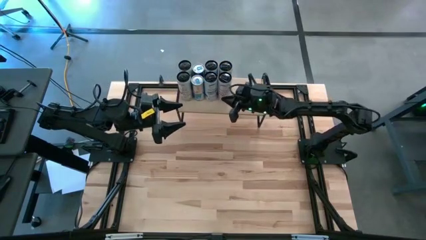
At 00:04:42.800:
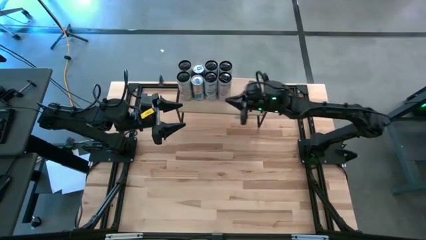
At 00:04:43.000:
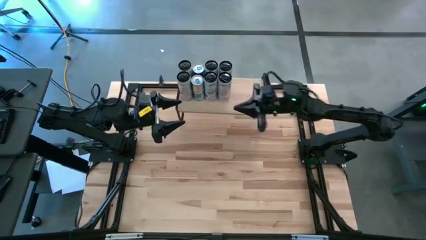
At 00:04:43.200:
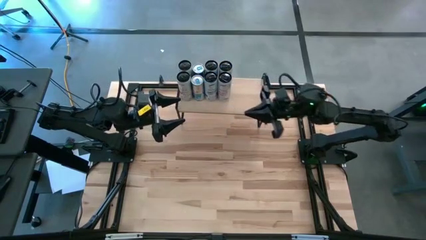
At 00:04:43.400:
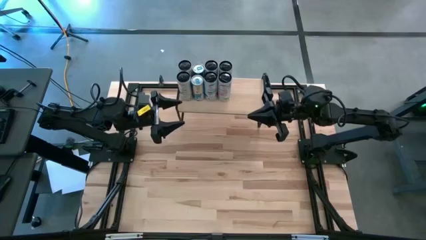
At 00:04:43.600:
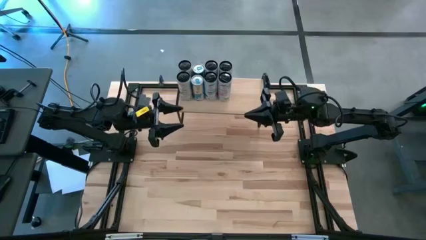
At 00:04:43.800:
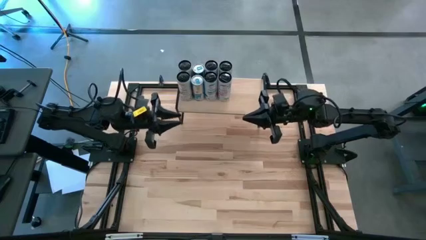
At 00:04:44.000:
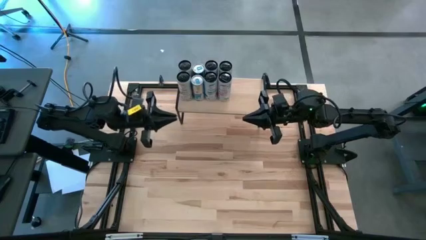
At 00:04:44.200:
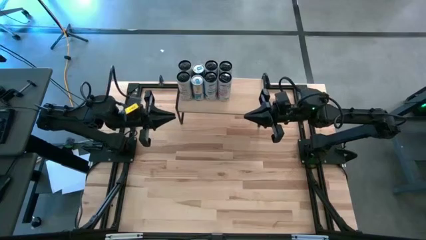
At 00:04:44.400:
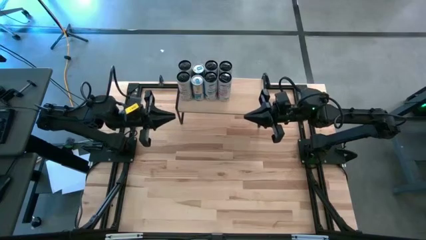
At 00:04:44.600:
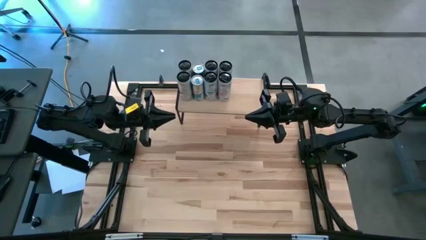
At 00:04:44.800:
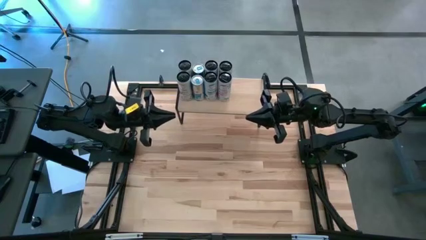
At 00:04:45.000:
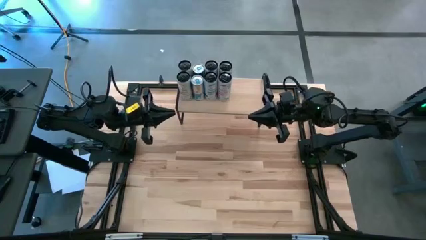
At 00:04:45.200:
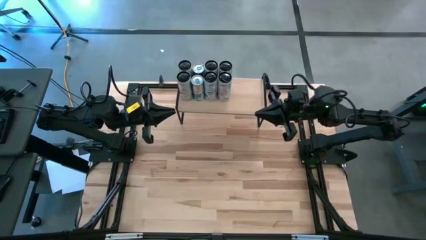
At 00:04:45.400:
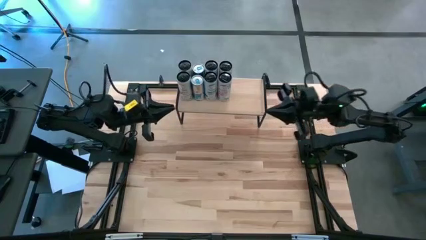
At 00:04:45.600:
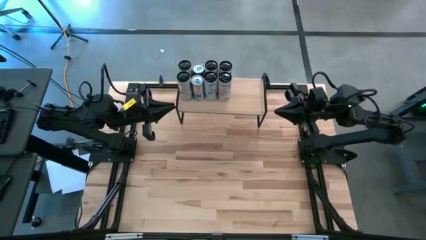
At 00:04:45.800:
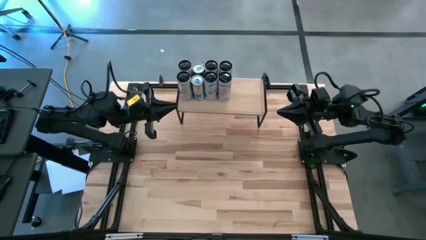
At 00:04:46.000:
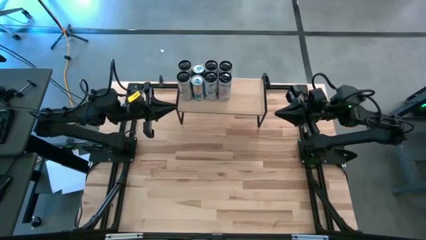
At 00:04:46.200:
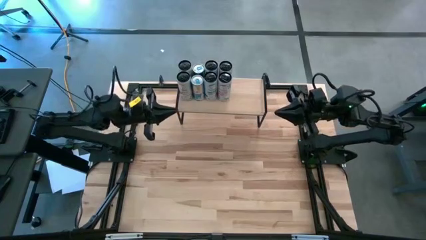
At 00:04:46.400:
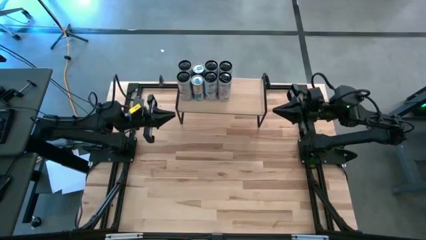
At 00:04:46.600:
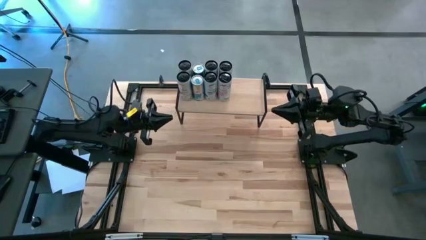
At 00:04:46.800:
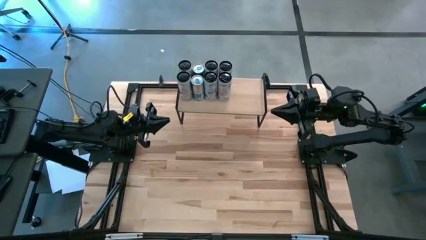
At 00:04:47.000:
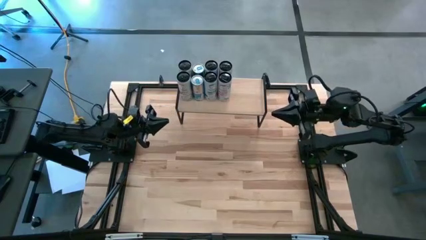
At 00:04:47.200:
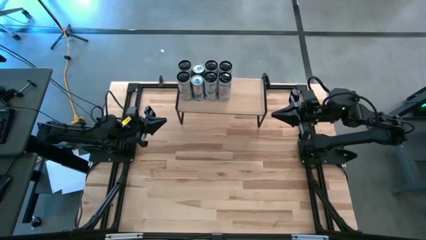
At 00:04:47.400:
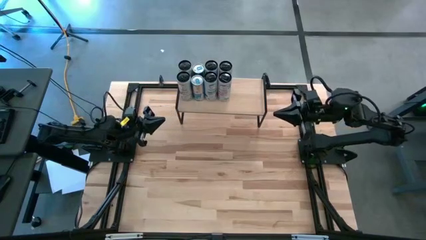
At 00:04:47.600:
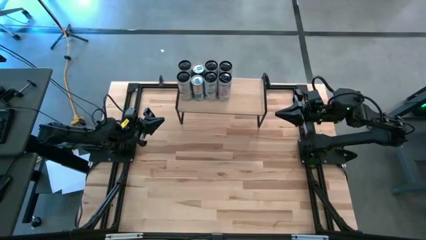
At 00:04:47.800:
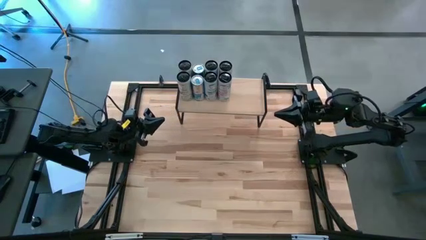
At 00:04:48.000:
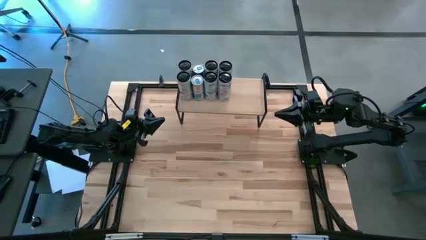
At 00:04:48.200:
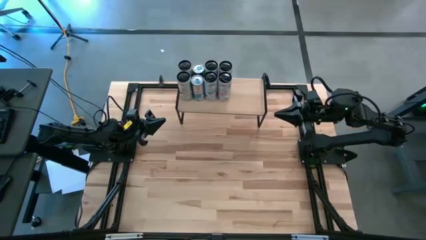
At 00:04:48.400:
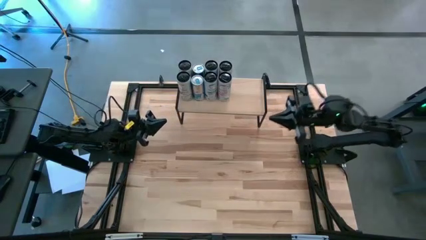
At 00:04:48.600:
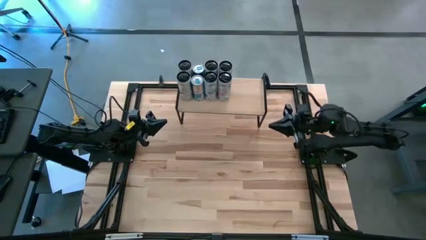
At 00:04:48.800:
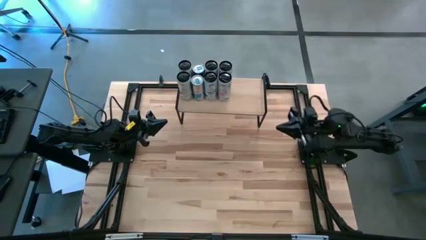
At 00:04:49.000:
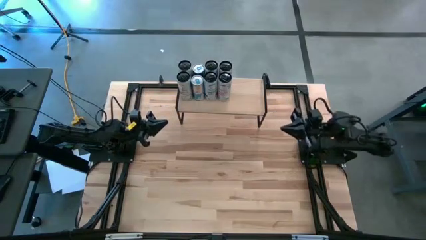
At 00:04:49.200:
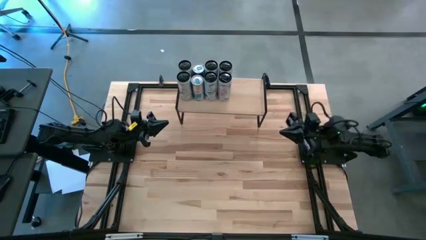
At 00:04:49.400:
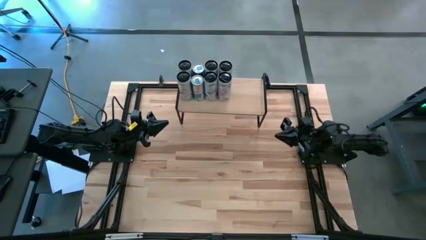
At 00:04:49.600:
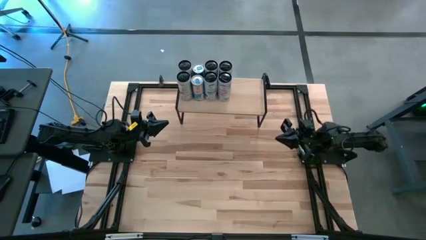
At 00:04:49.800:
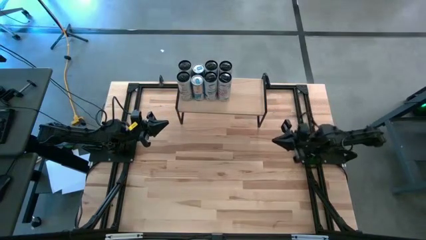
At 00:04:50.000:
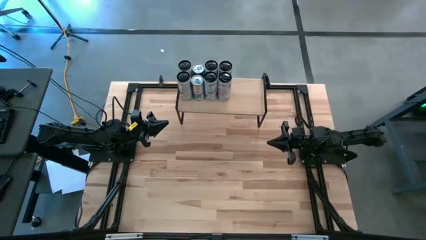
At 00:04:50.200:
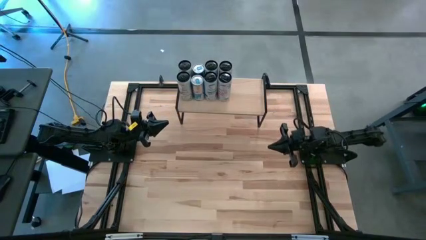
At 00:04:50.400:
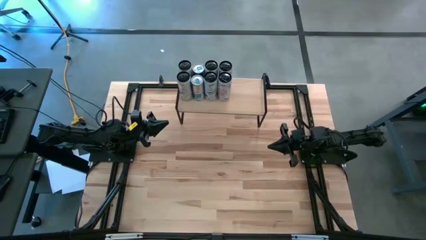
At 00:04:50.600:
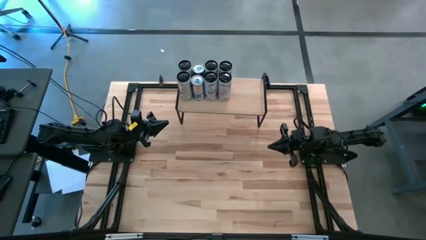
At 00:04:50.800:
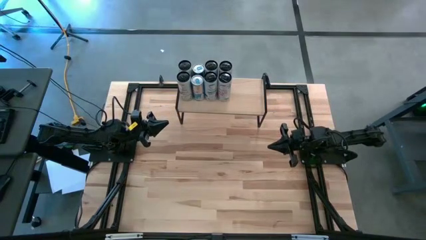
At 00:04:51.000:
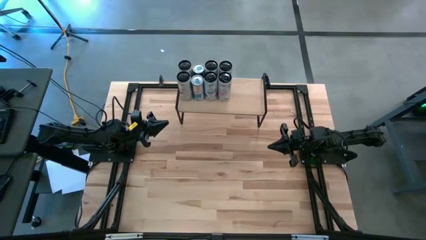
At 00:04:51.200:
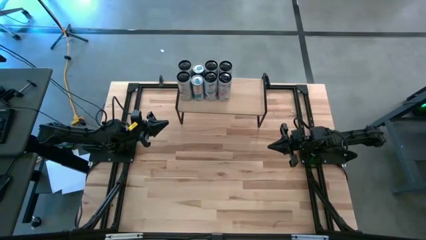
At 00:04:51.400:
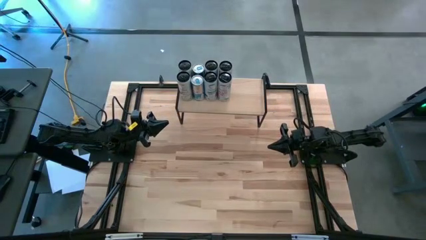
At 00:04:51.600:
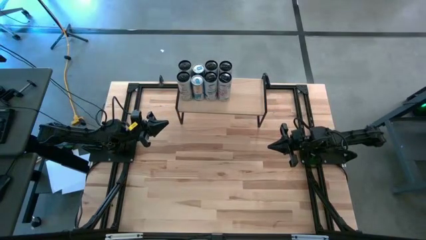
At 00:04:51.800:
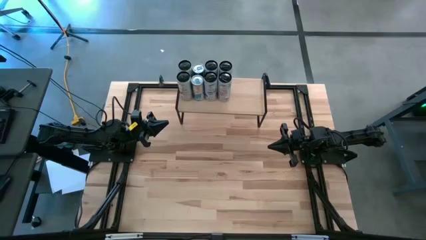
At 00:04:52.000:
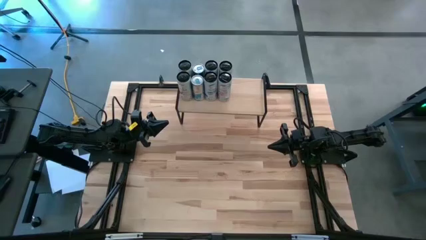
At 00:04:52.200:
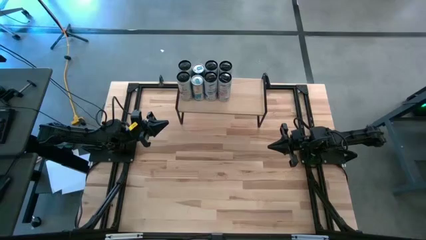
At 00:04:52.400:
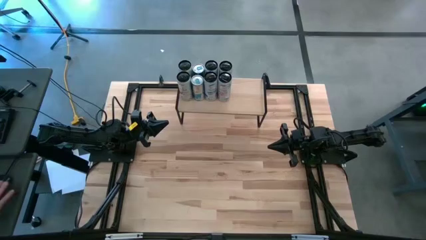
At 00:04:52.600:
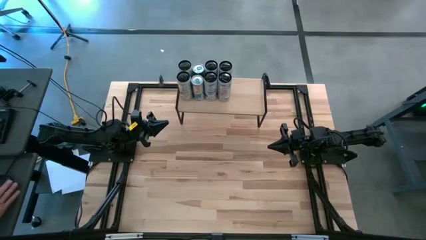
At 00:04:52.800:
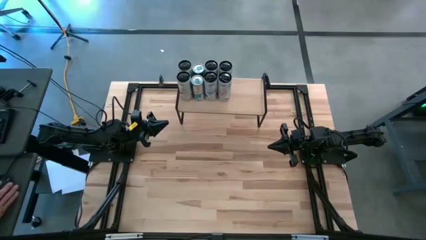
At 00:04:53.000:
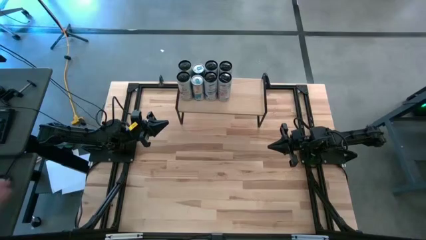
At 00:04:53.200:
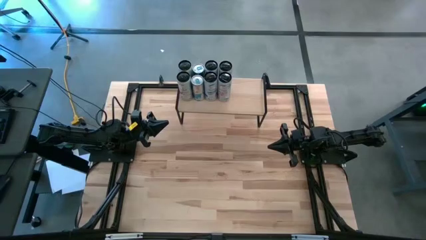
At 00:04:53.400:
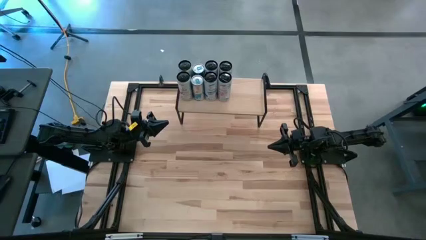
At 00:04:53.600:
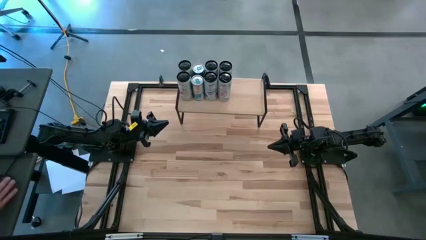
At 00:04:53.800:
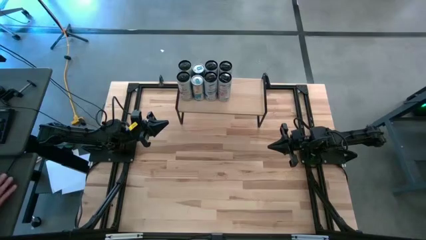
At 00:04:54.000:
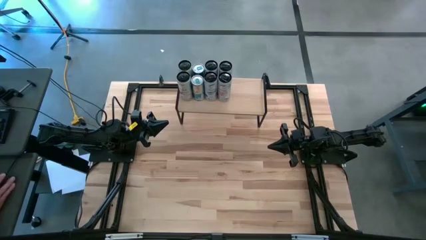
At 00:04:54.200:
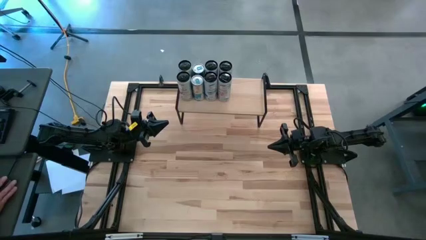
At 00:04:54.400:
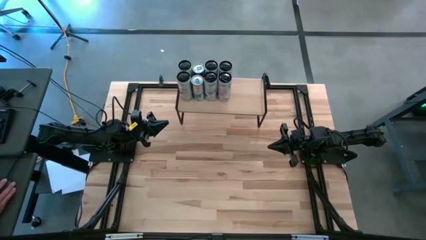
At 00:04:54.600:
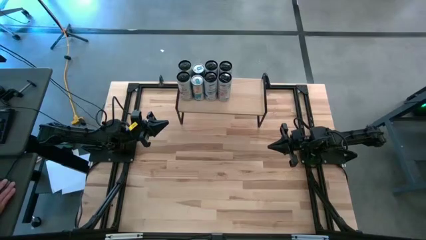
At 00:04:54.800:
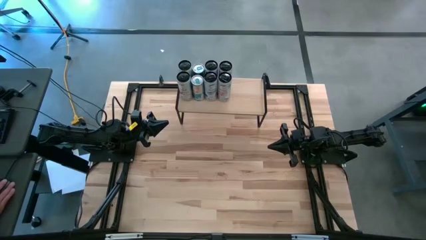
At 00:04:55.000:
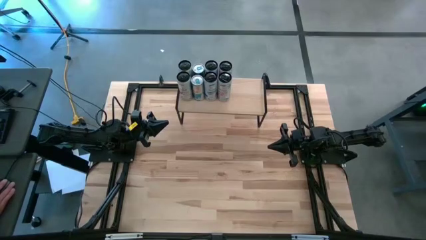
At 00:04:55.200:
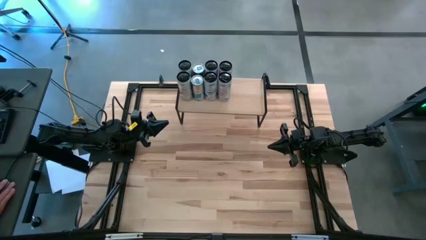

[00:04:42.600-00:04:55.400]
Task: Place canned beverage on shelf
Return to Home Position
